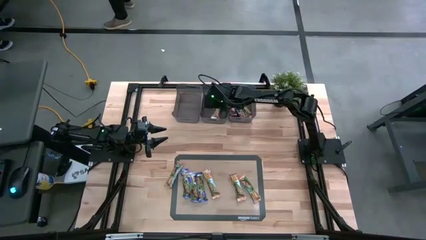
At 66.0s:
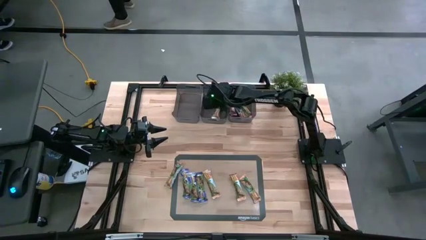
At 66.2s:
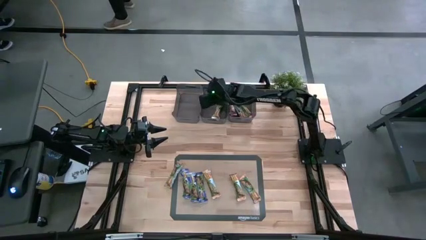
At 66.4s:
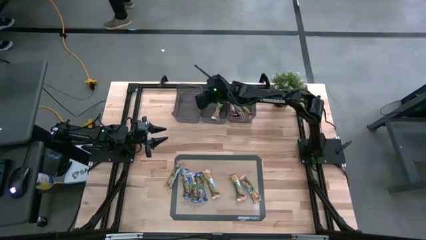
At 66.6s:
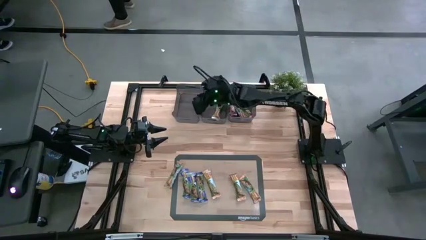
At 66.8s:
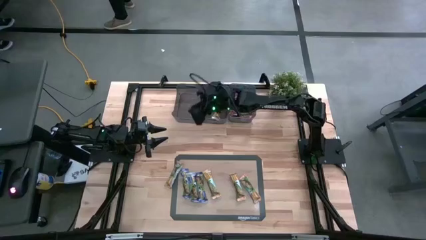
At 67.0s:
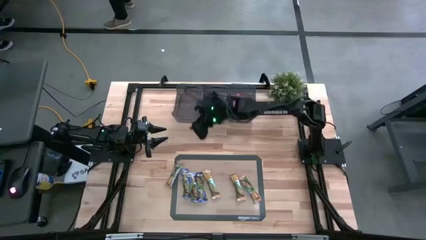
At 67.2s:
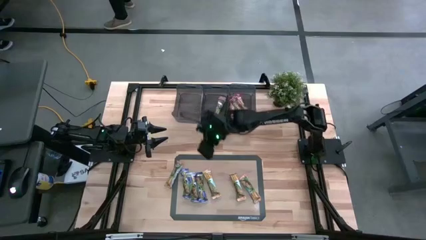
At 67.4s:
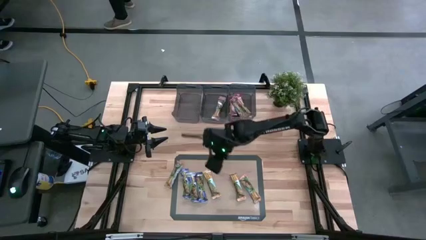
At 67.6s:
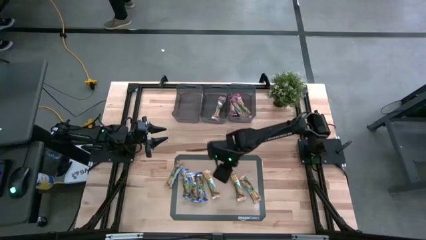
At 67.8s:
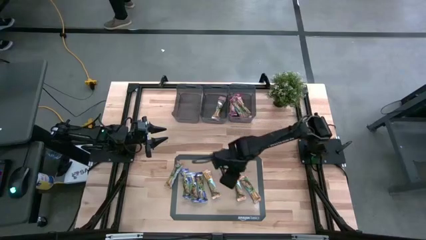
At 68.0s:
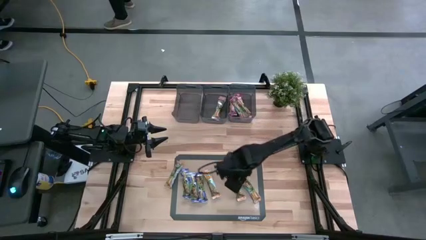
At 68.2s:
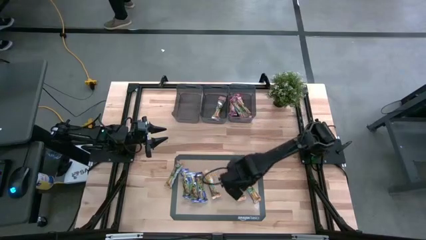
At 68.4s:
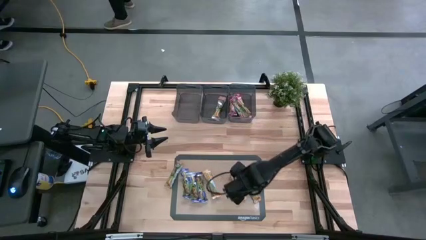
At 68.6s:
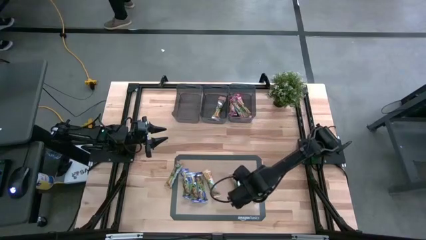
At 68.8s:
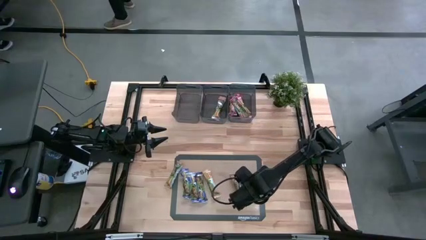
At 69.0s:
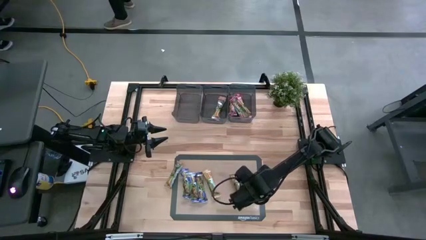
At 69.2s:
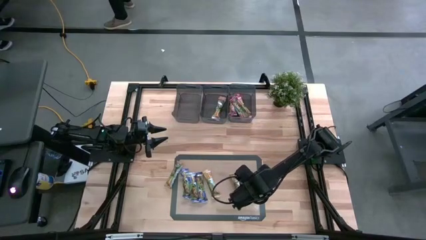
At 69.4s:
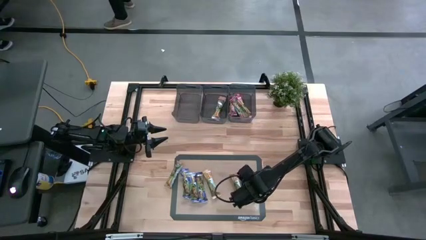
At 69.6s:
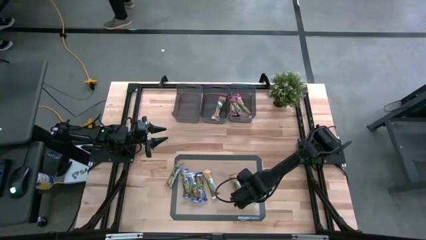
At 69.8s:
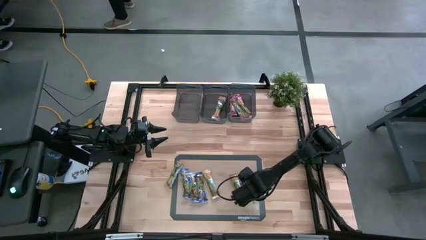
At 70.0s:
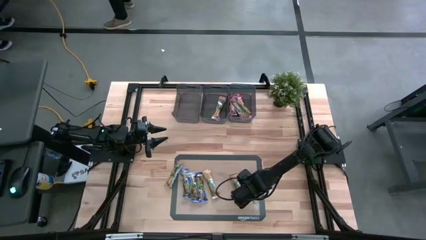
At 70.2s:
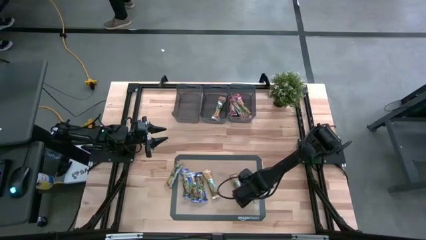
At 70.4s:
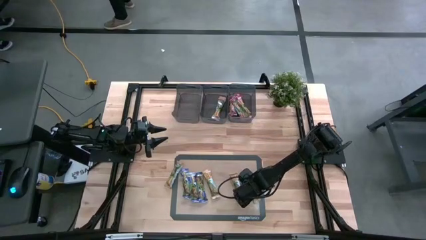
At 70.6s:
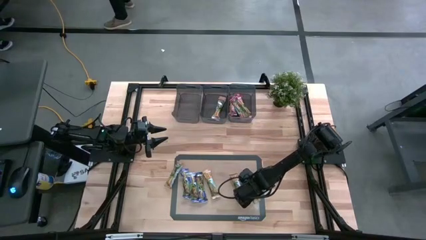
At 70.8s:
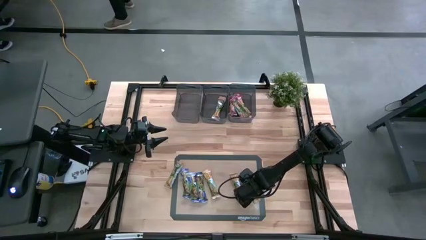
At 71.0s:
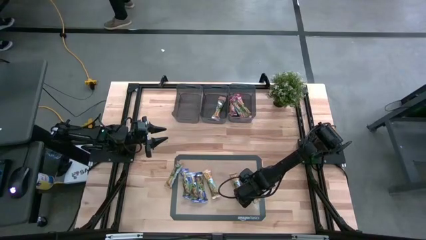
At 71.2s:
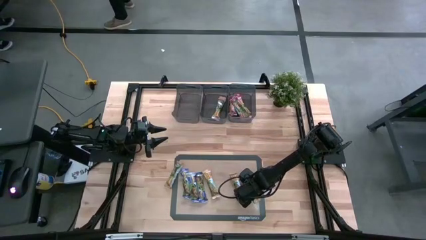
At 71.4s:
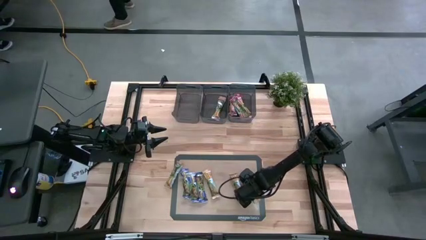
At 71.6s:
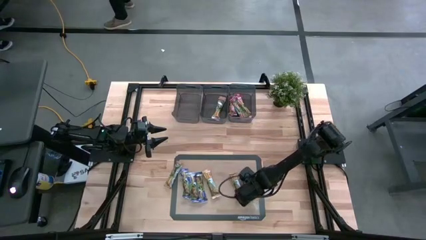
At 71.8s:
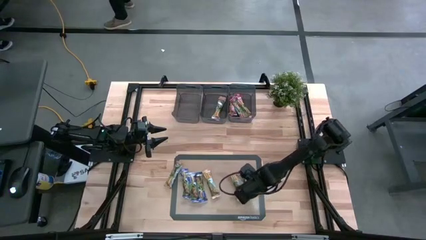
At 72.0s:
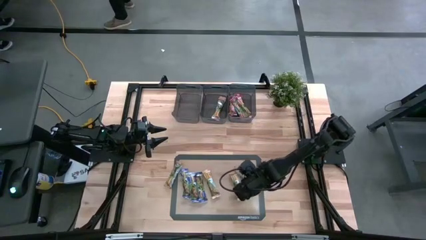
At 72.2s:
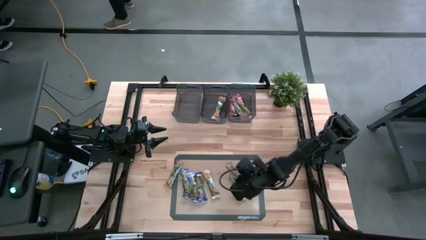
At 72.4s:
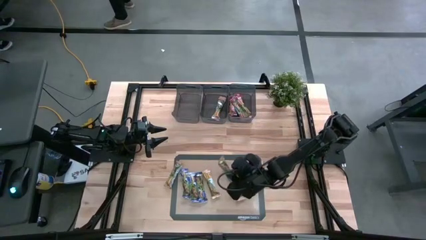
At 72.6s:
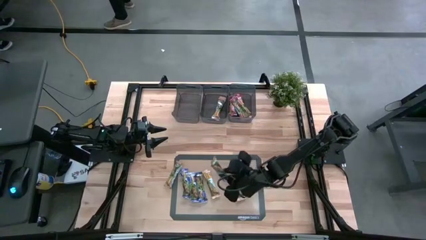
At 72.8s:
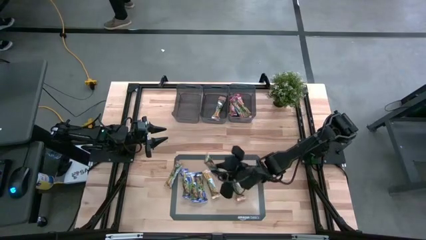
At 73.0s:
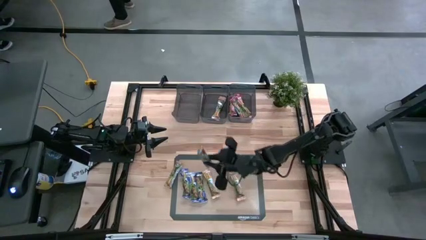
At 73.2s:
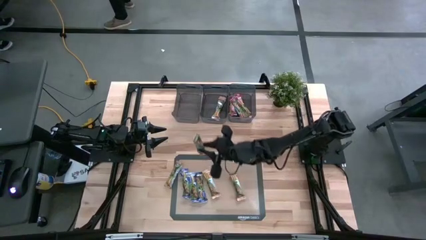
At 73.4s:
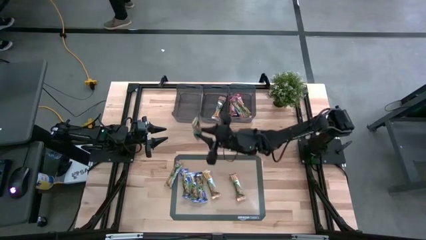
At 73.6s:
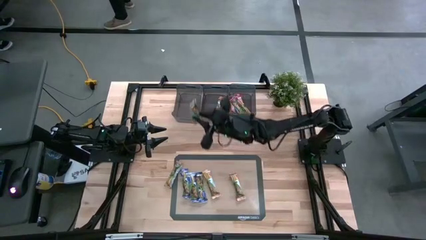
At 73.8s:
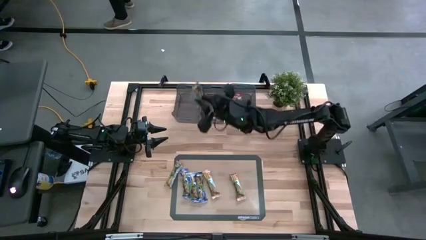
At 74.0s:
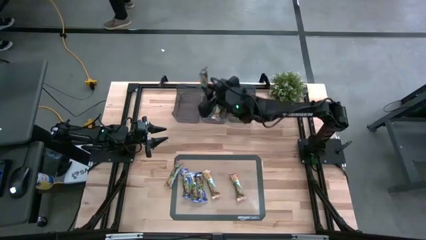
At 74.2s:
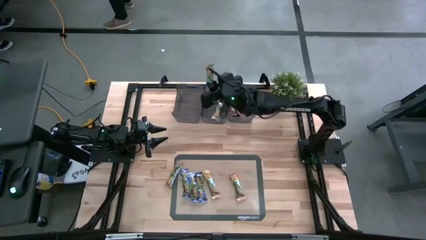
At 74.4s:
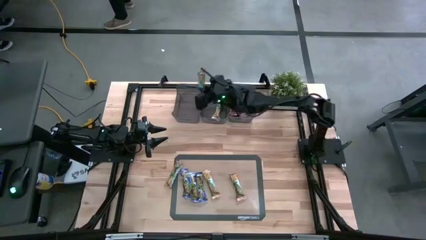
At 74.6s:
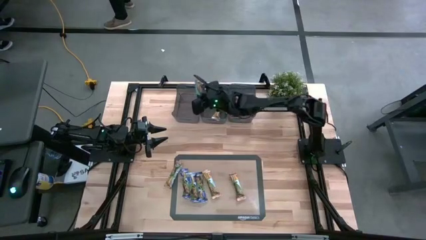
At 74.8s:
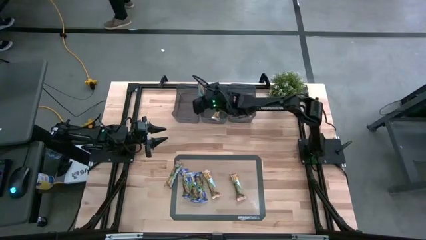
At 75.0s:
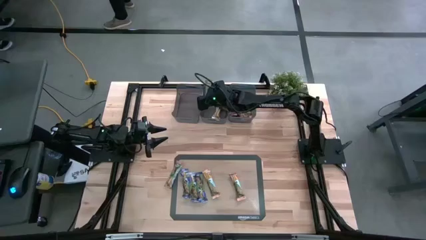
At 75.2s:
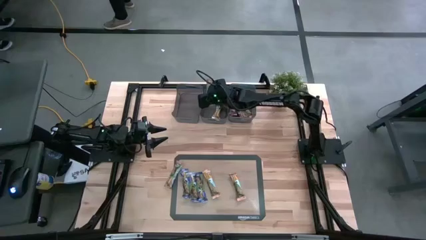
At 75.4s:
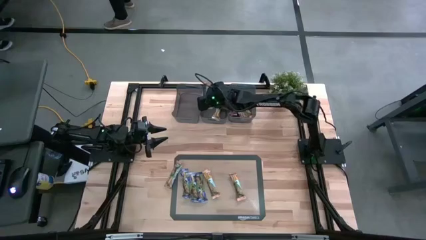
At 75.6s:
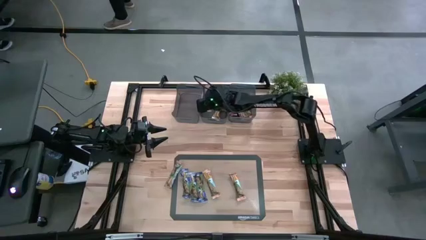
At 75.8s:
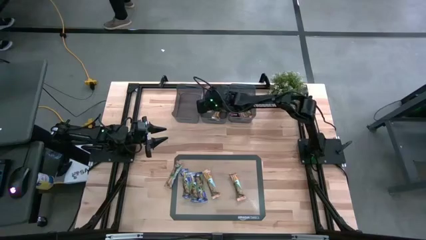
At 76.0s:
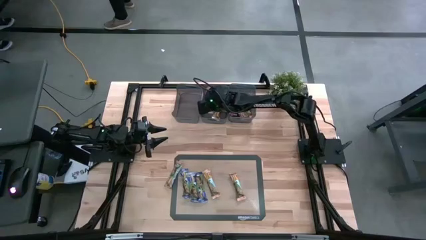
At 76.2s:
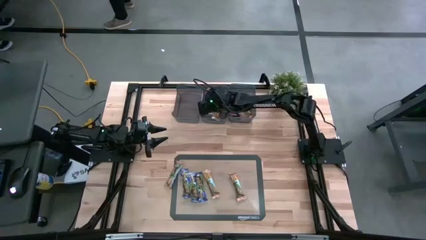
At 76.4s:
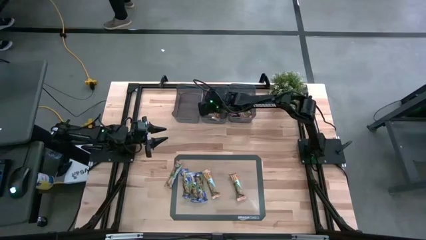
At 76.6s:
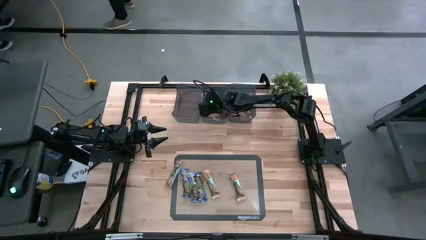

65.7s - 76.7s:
Task: Pick and place Granola Bars by type
Put the orange granola bar into the middle black bin

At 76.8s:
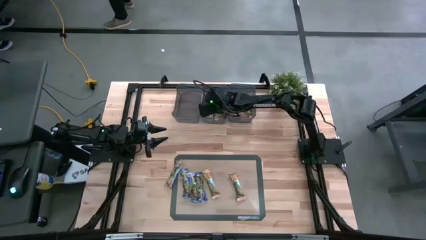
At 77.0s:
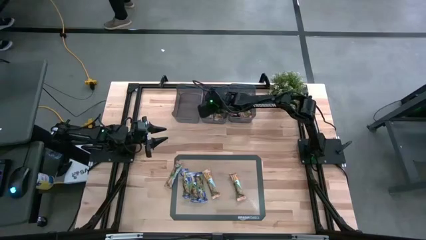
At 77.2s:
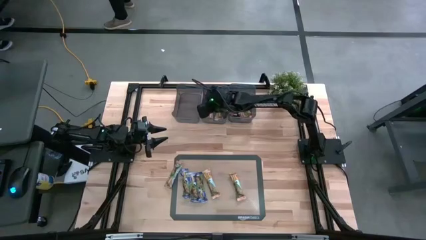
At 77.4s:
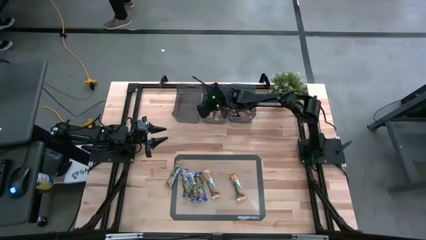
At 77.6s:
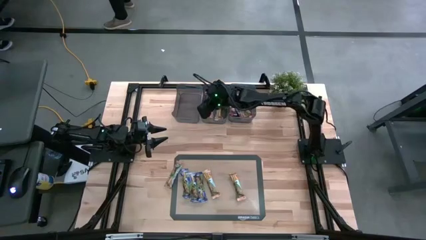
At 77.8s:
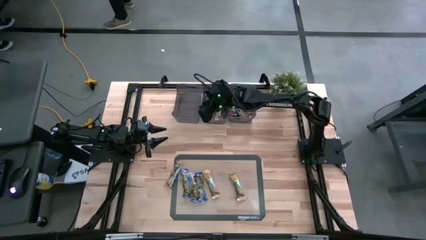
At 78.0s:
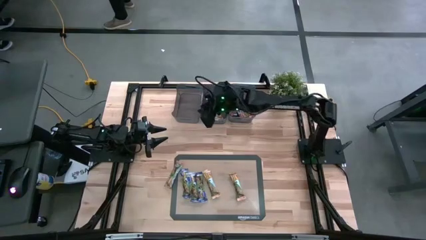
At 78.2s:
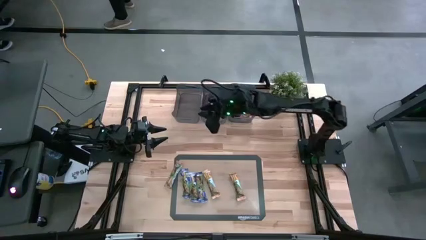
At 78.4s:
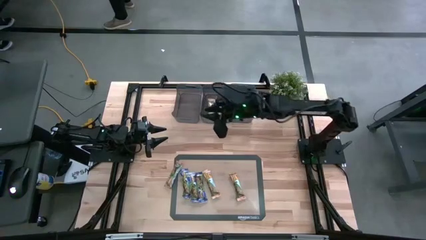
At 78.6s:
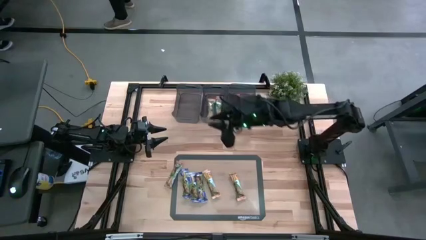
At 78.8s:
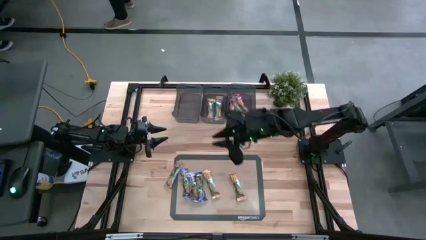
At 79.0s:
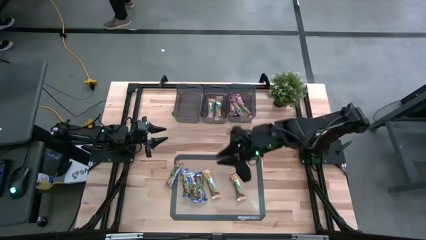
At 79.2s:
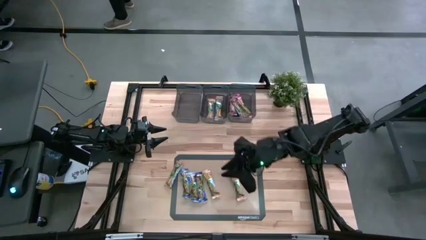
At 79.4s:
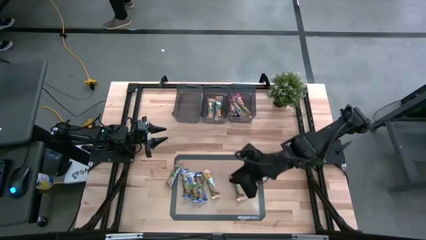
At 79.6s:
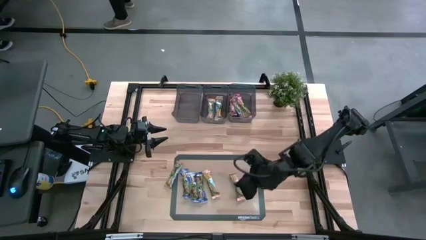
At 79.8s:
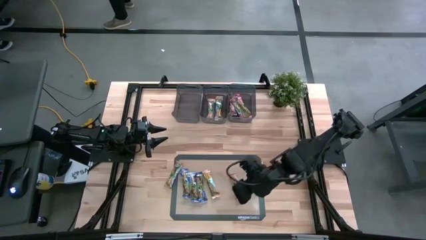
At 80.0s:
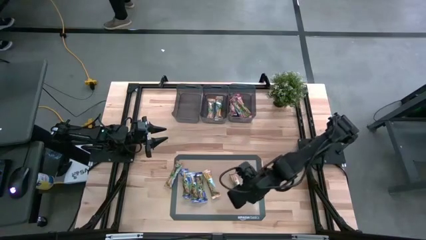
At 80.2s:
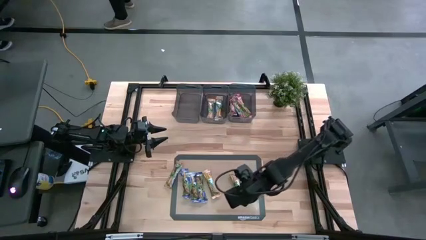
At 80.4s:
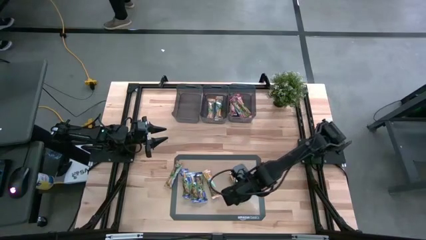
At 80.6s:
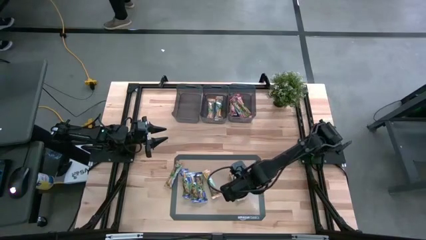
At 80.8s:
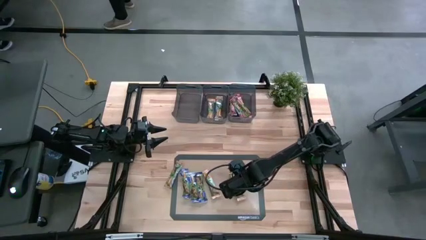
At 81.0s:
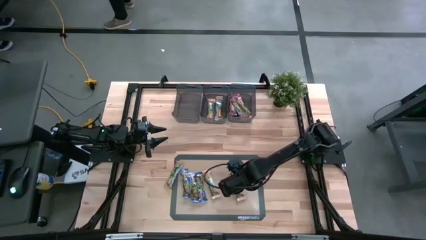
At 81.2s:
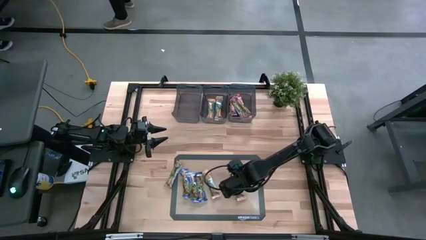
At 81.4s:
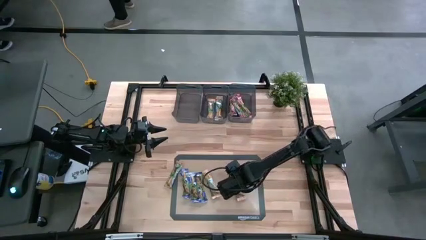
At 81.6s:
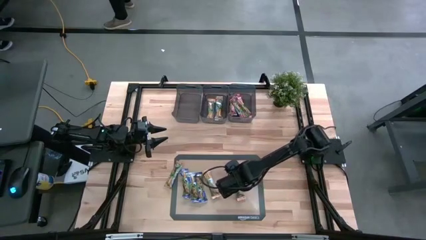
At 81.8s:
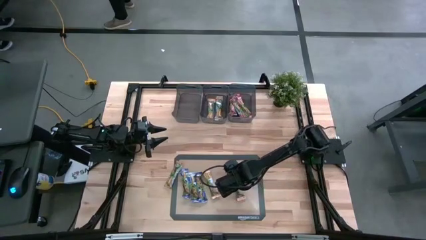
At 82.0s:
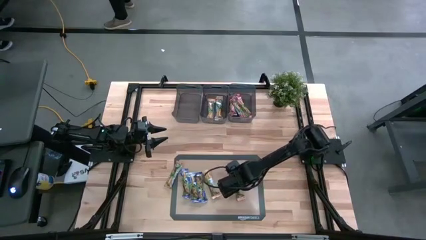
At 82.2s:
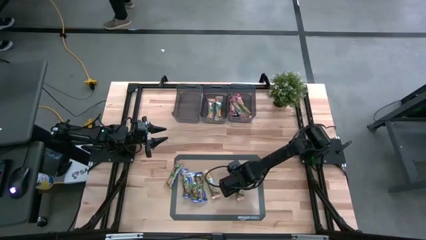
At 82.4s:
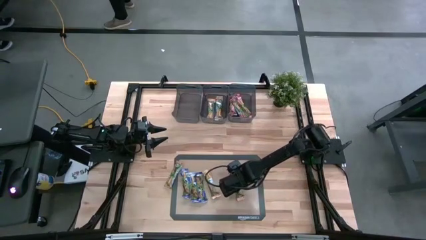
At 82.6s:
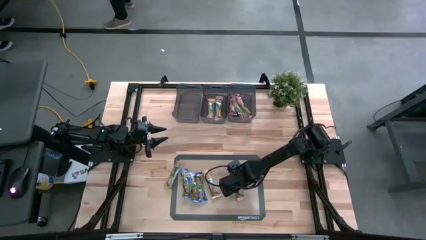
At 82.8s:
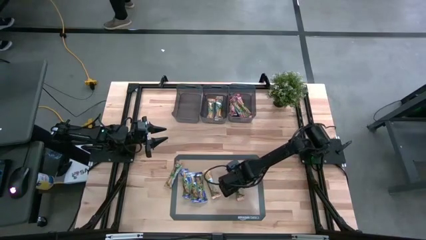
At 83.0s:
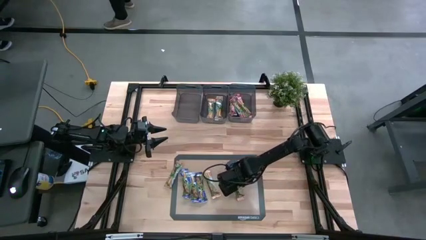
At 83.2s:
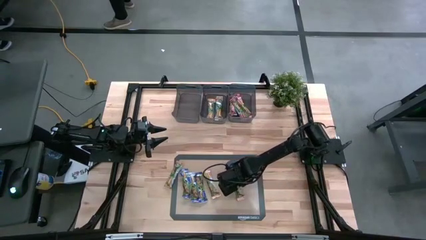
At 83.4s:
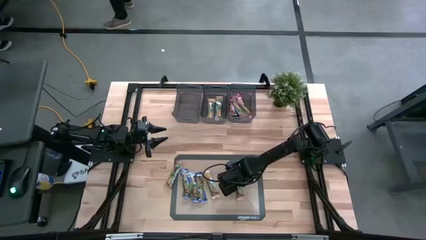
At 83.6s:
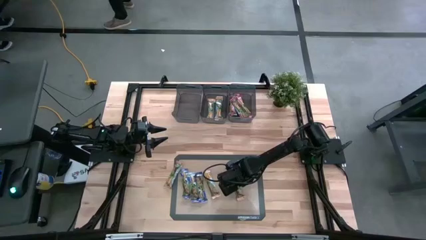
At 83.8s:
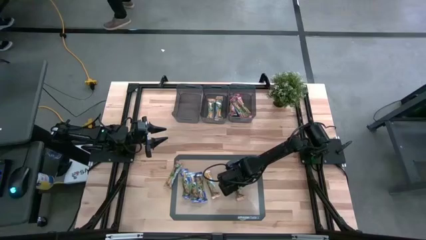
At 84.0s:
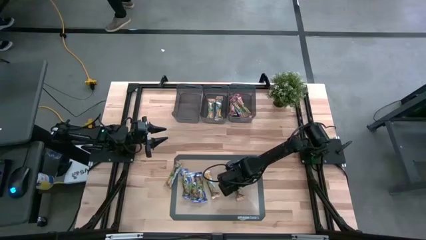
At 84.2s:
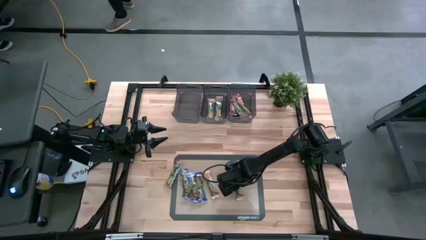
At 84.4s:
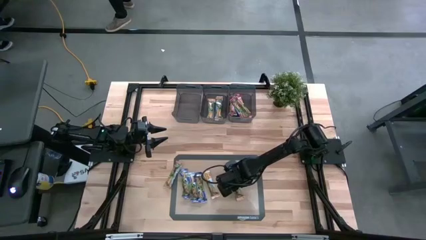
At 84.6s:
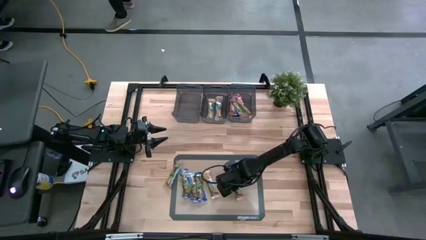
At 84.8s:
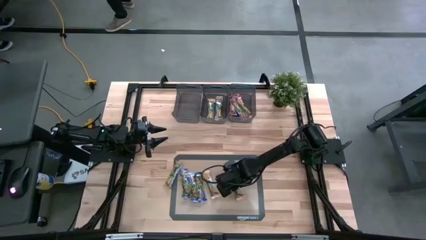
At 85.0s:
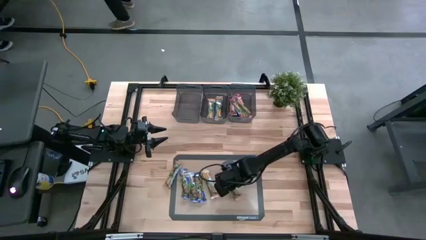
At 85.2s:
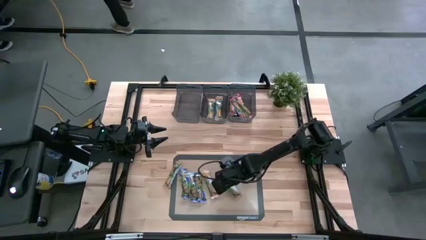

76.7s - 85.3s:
Put the orange granola bar into the middle black bin
